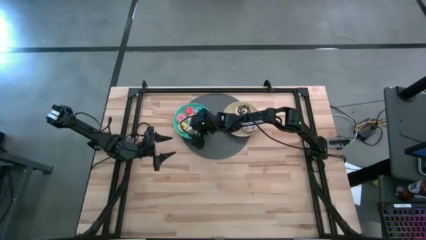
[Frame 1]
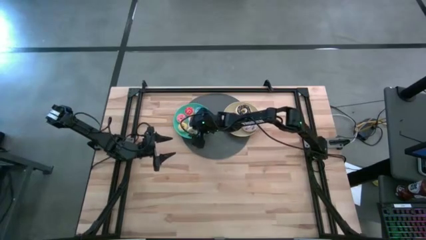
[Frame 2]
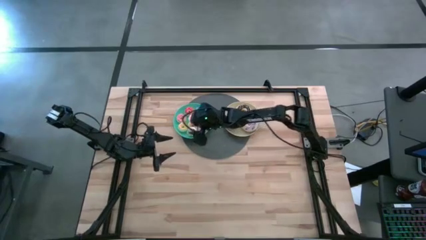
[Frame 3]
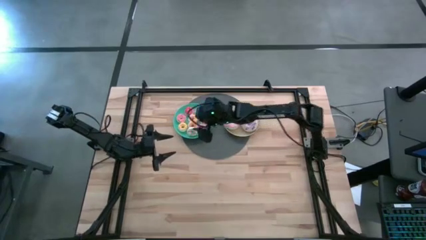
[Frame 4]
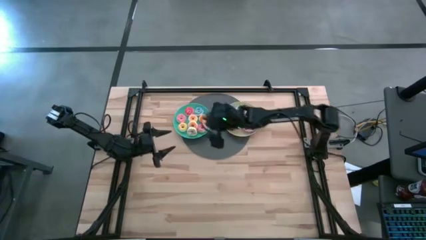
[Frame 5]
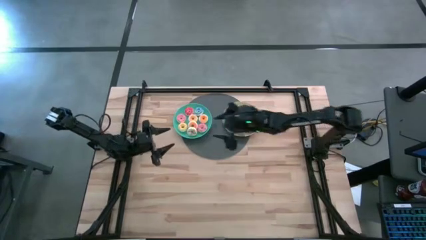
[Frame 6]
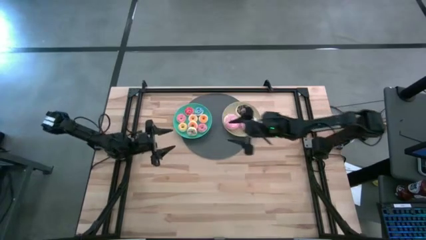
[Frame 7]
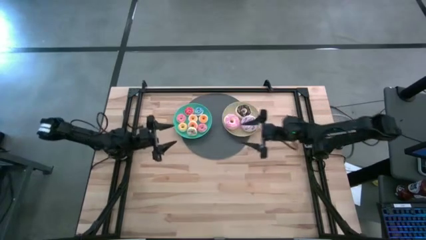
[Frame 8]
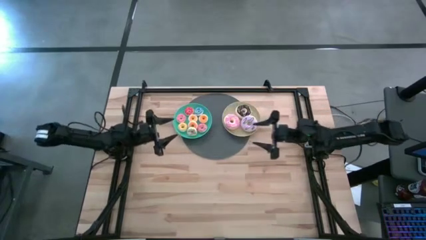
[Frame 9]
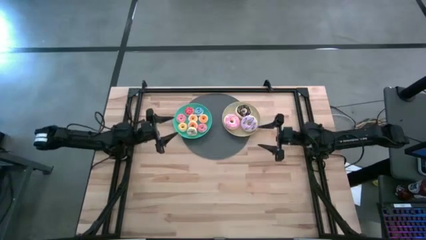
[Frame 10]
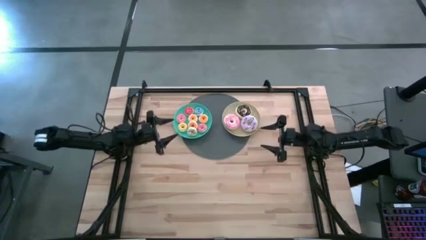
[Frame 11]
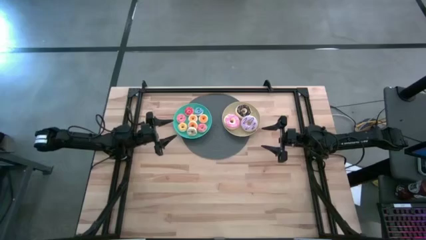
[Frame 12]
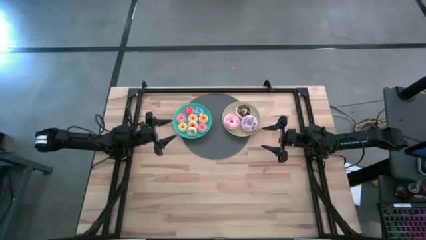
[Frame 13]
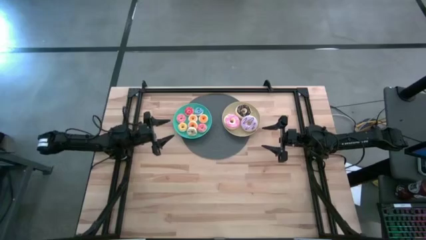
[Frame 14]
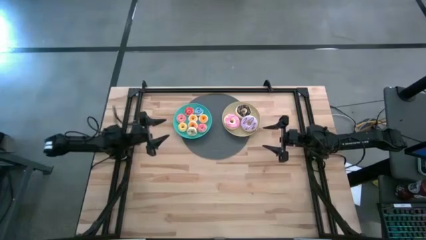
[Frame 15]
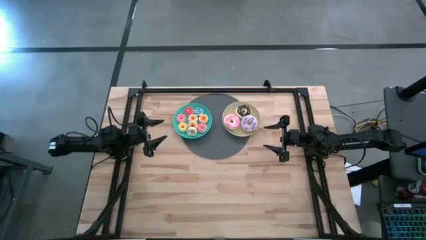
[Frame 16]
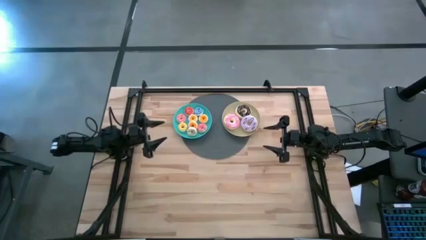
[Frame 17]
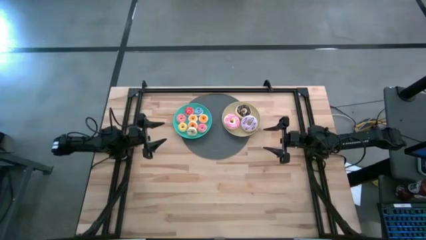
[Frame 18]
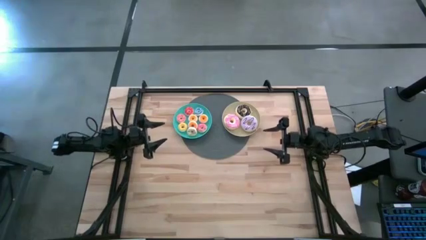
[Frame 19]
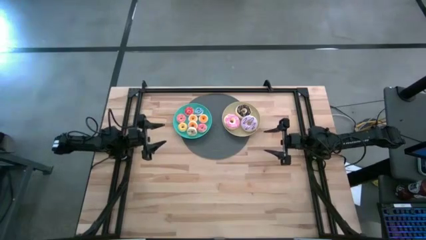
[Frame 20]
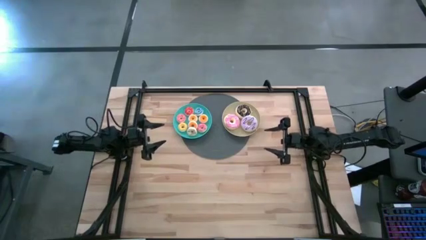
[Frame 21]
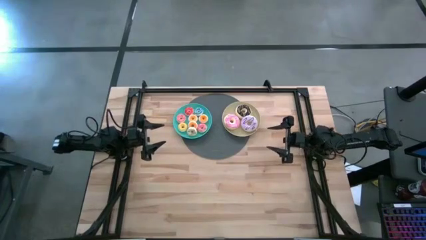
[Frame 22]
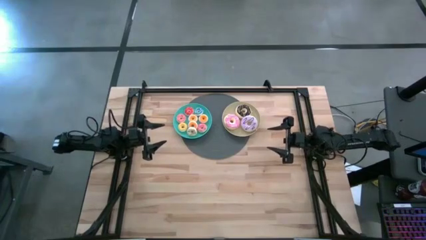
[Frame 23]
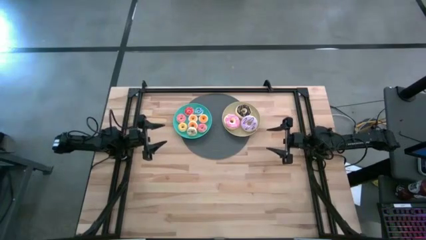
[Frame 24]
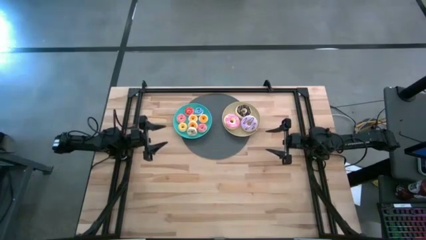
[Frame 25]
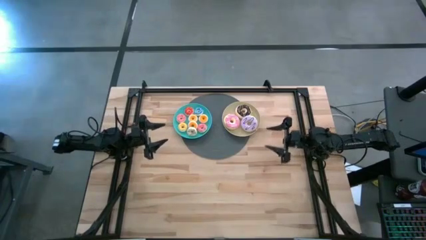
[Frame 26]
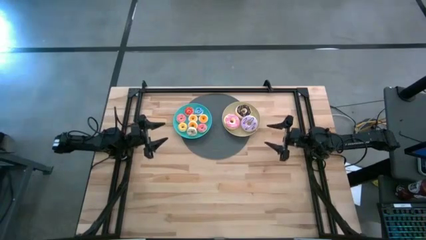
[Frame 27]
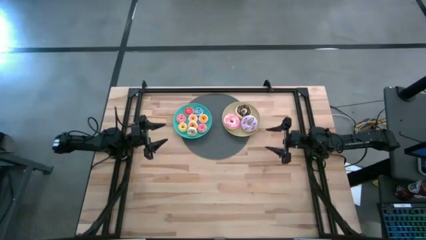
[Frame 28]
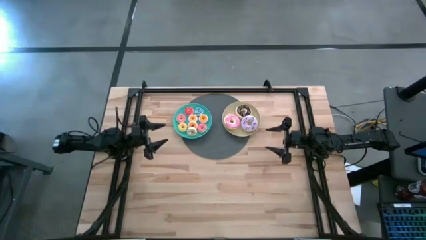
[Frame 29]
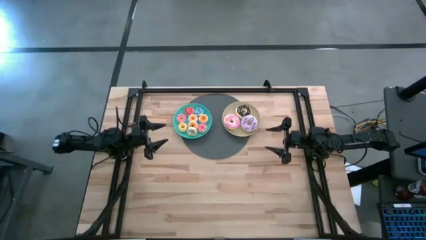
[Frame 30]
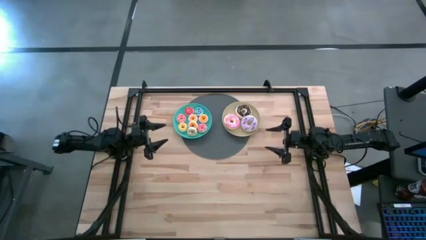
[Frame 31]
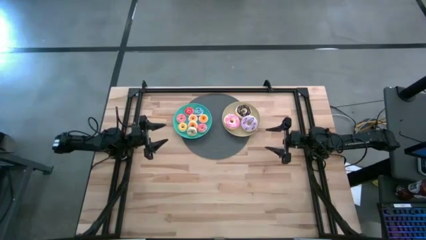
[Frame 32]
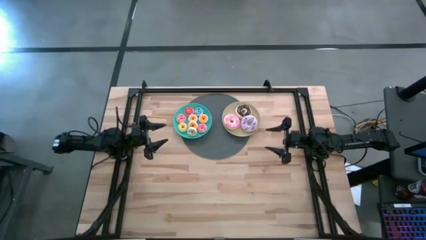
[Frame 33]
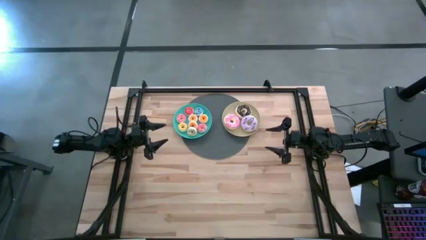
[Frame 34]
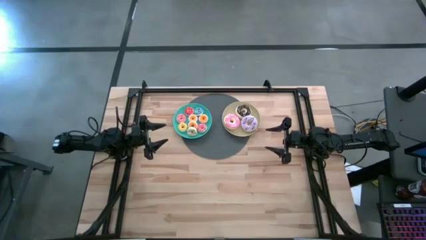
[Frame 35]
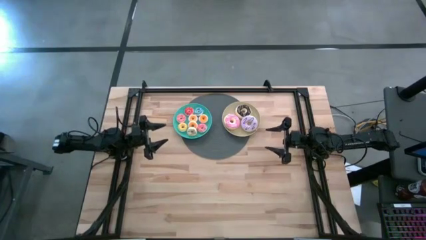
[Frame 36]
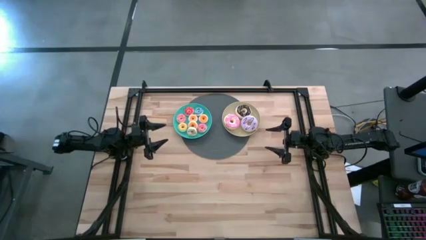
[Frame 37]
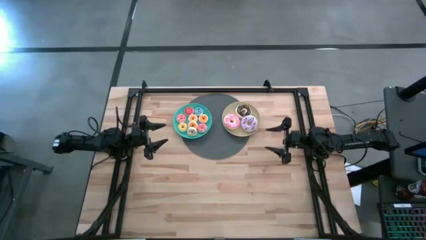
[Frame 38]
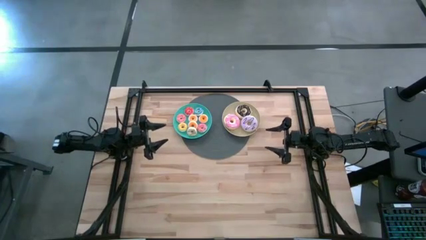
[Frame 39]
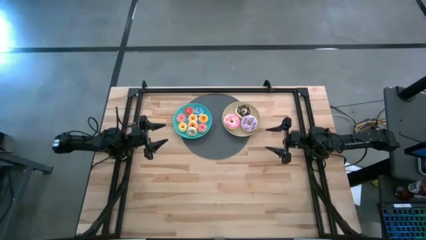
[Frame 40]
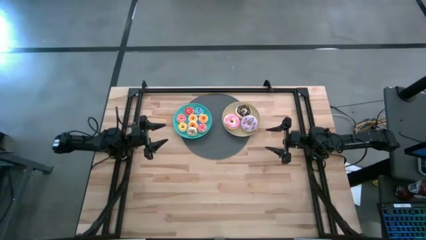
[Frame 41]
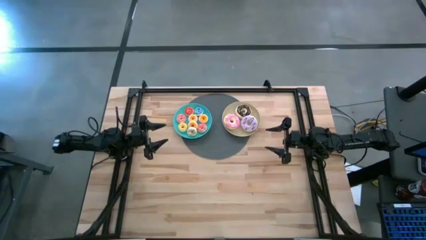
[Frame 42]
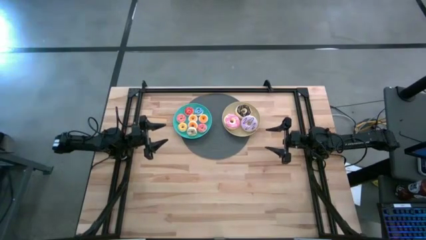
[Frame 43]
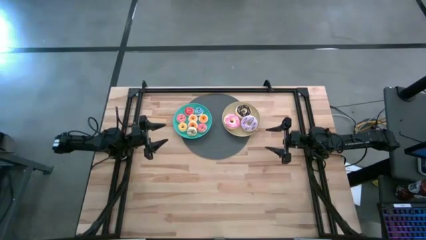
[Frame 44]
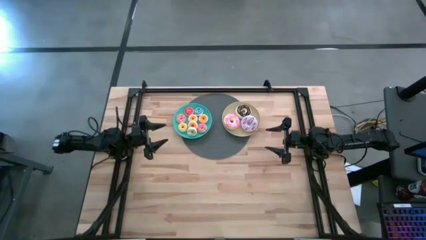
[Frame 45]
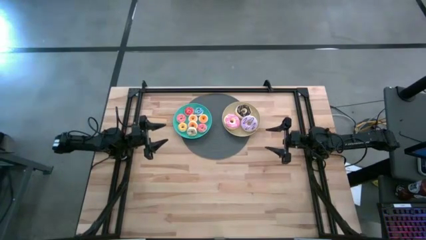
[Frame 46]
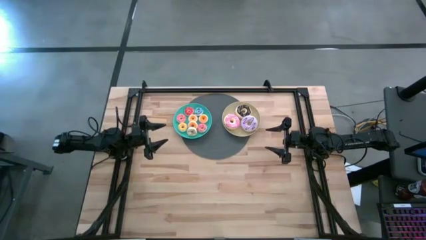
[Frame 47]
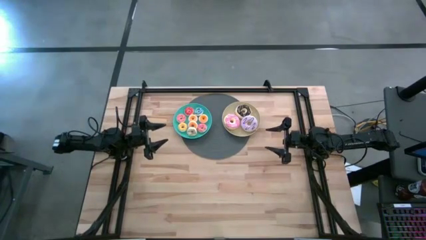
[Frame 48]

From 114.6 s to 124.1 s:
Task: Pick & Place donuts
Return to Home Position

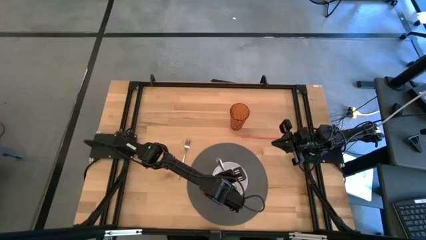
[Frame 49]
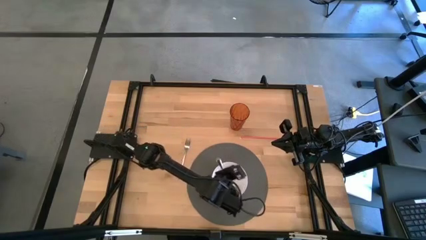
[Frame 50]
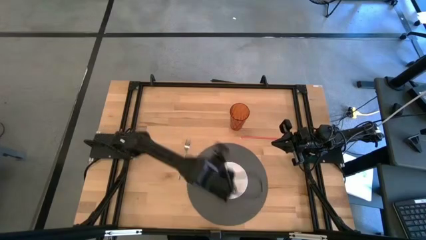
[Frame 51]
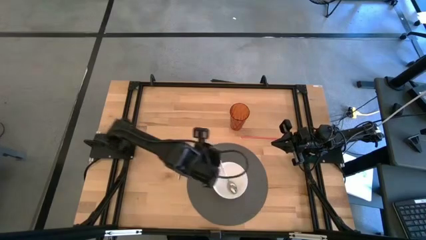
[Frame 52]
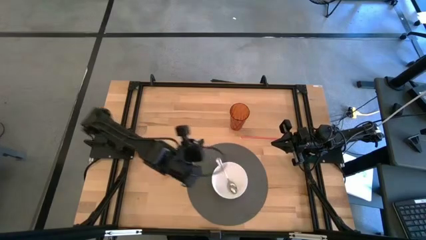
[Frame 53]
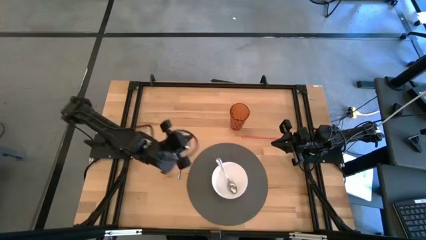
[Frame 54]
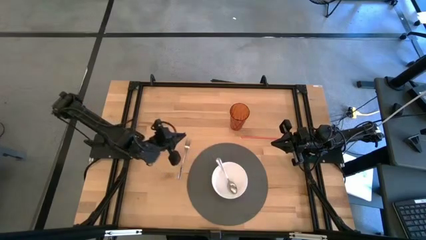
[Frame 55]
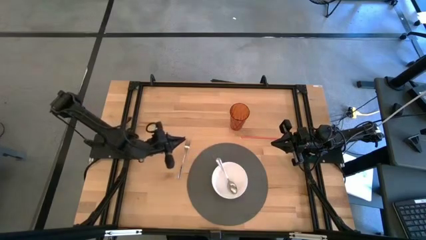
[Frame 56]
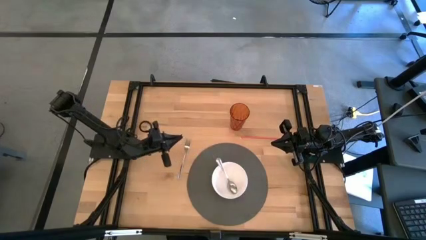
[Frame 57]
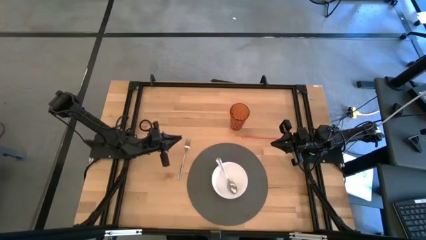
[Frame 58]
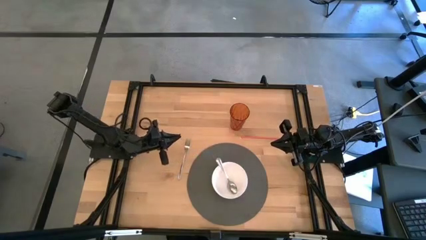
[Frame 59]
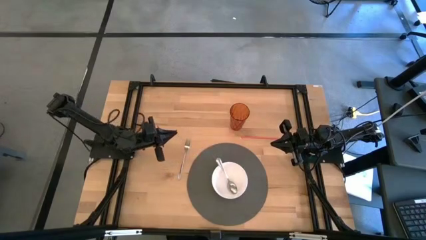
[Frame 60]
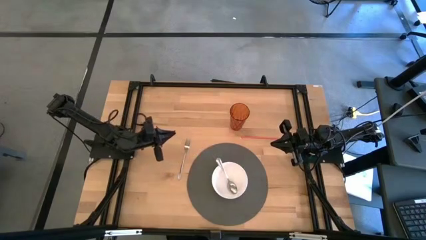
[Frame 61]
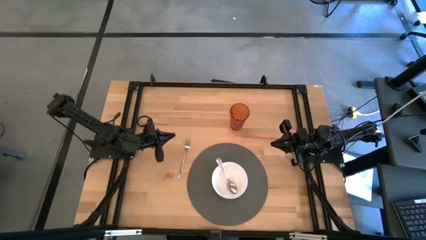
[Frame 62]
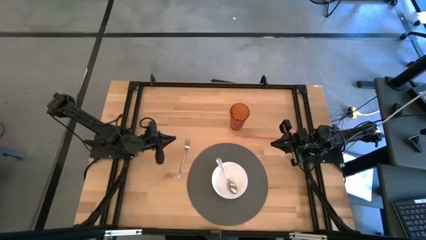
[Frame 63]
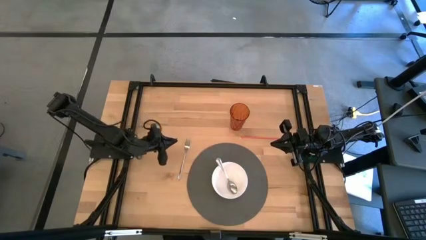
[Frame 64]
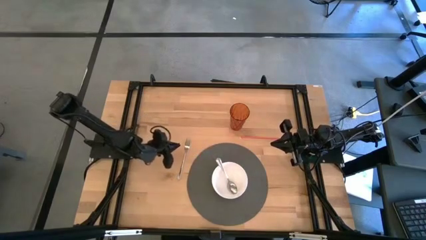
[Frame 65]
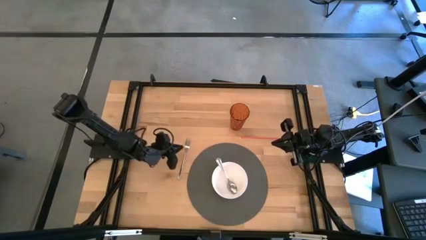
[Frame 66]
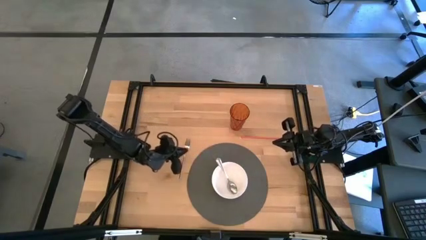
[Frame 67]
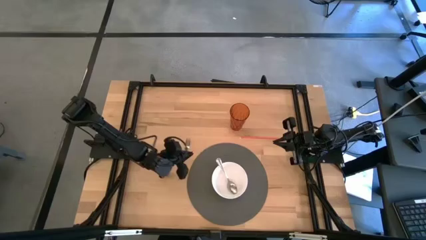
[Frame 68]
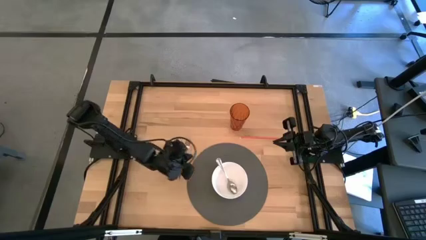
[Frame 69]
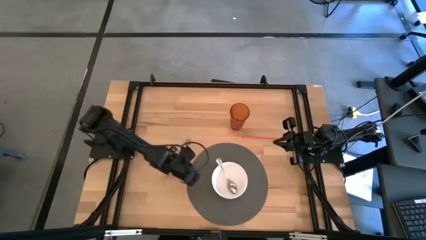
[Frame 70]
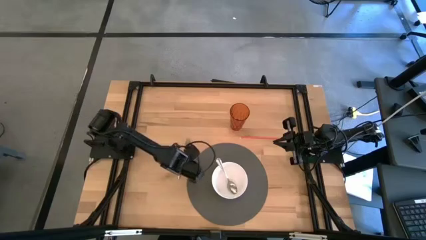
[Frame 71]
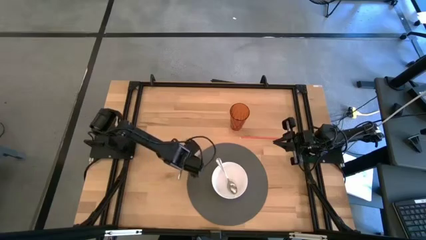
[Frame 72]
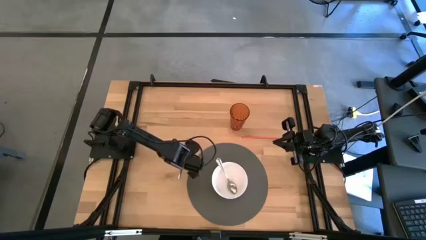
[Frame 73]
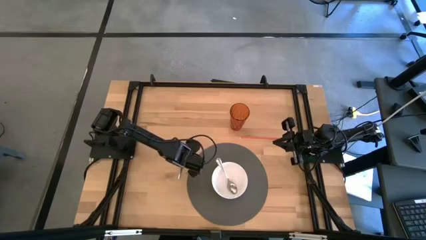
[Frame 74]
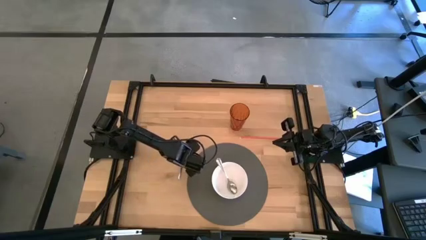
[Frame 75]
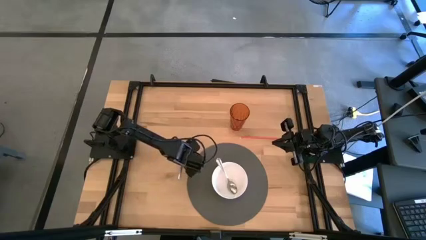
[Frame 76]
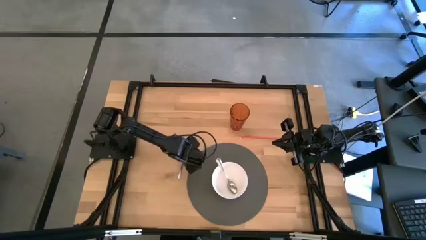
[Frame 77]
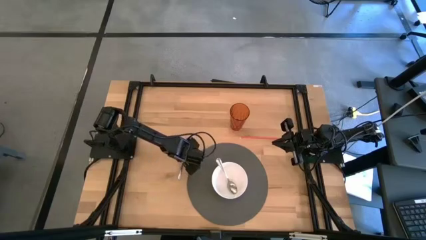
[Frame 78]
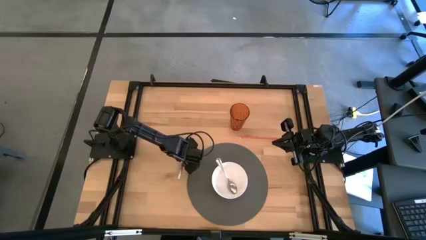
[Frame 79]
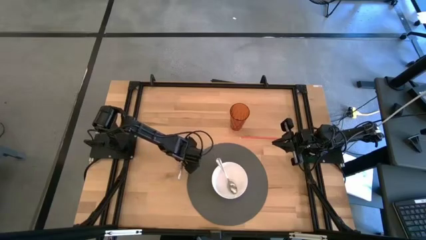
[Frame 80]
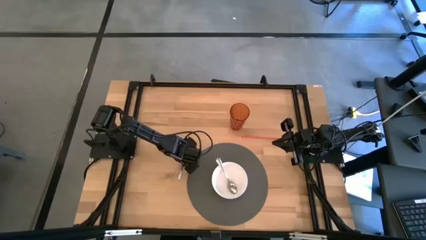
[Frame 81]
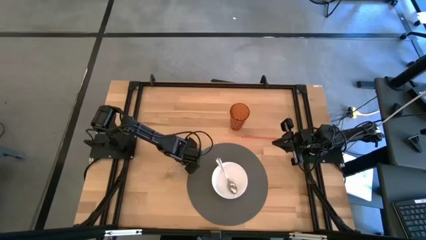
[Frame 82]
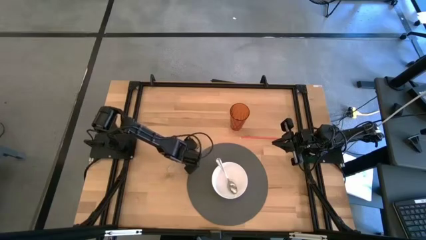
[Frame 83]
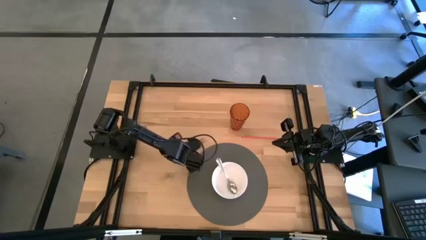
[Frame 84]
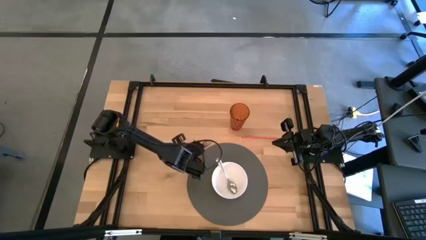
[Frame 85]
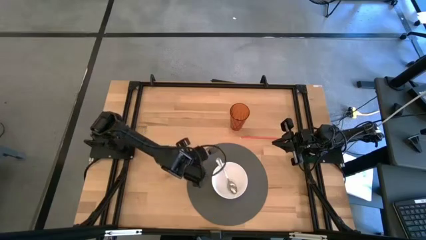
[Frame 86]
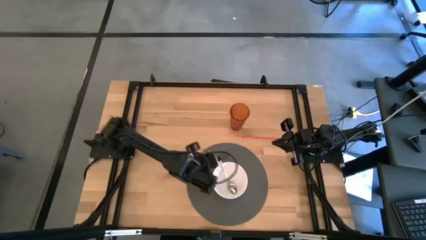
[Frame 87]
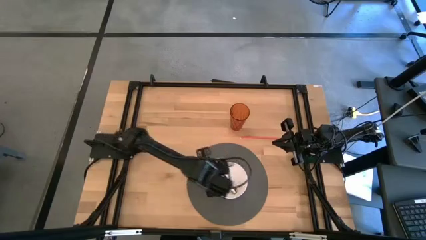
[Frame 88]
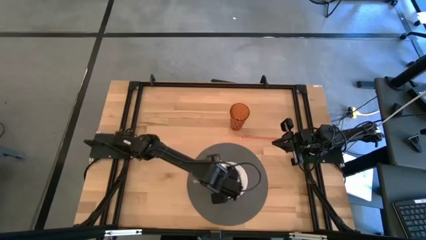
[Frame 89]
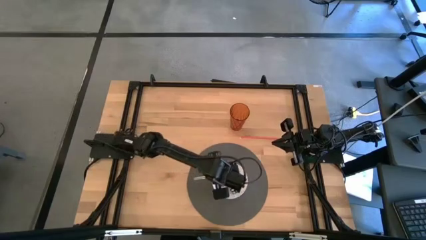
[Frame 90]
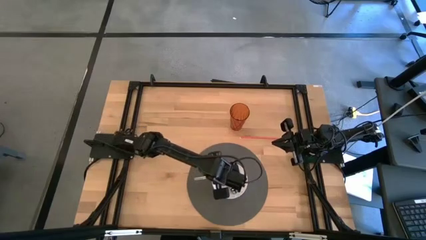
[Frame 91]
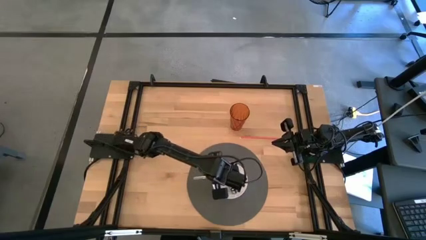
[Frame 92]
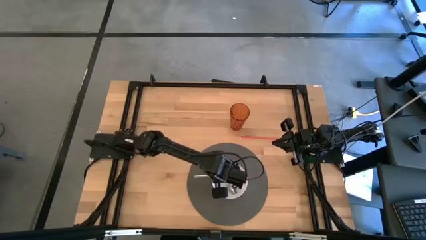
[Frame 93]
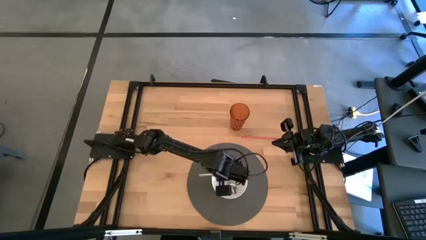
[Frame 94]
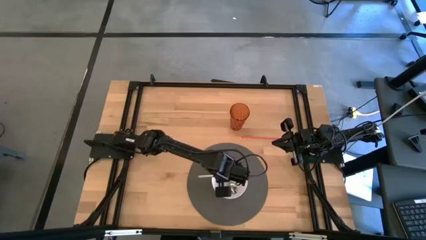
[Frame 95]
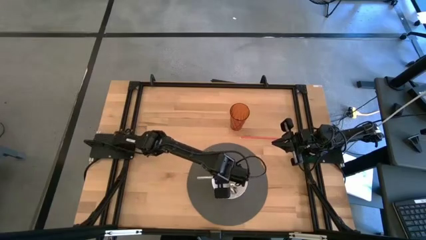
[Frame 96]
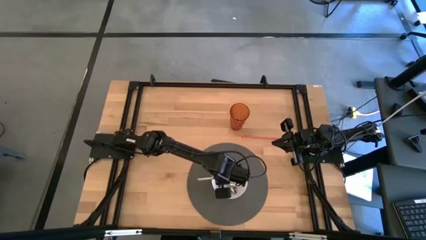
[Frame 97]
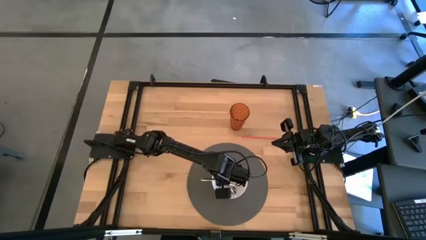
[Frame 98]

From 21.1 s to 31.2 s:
Task: Pick & Place Utensil
Put the silver fork into the white bowl
